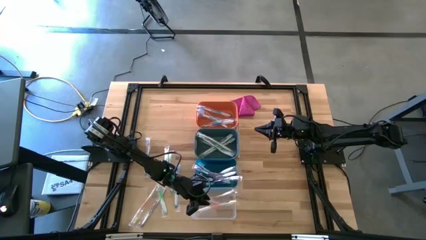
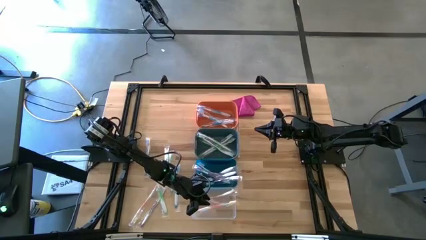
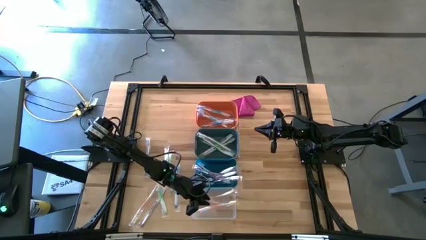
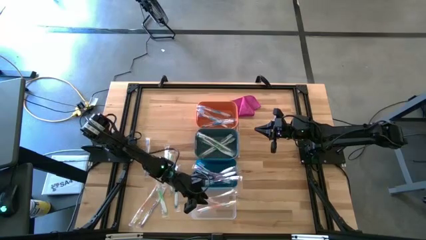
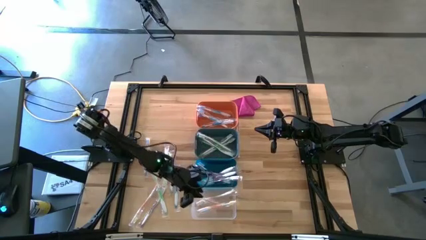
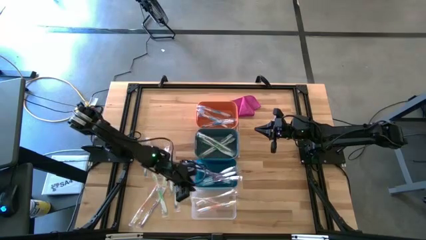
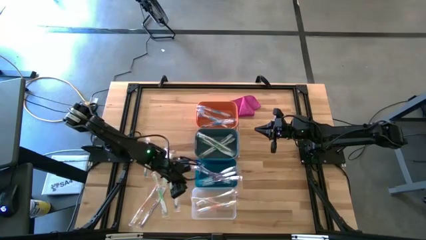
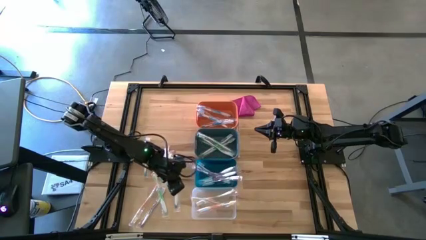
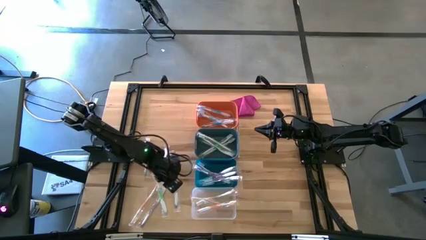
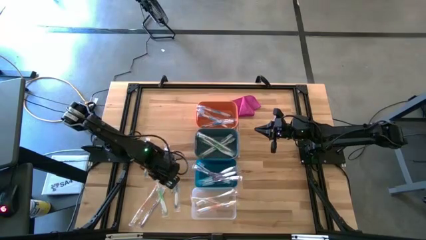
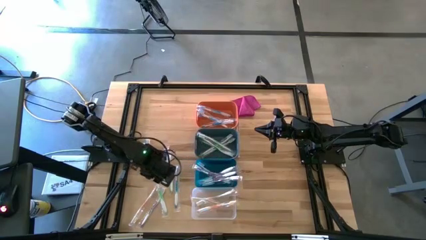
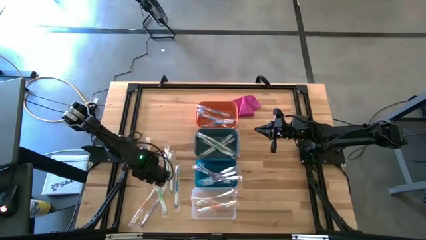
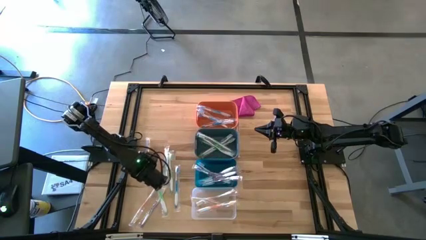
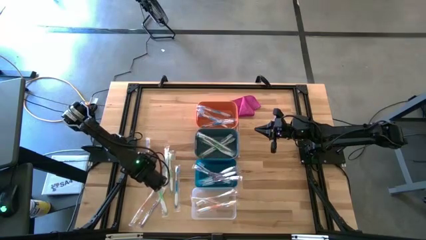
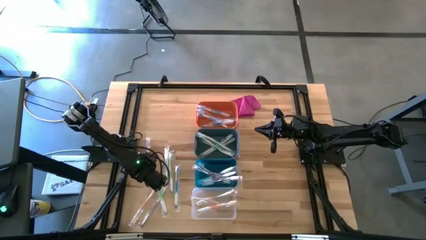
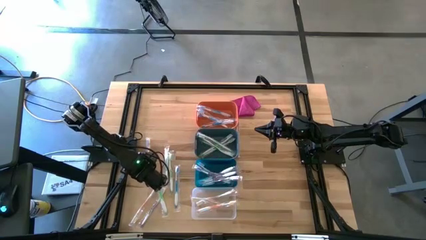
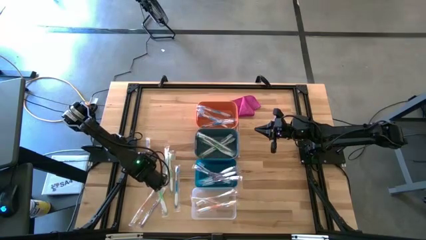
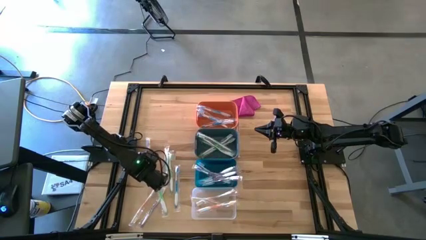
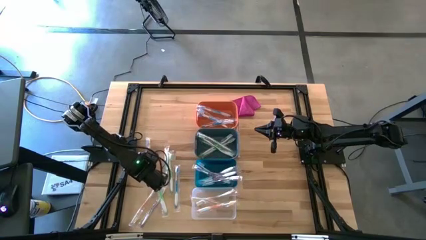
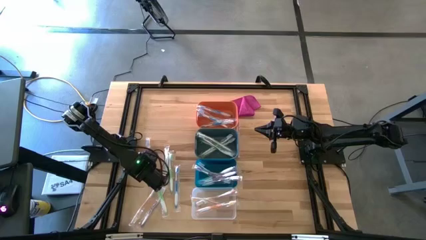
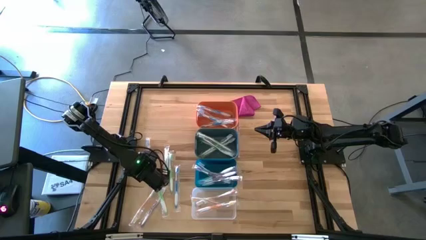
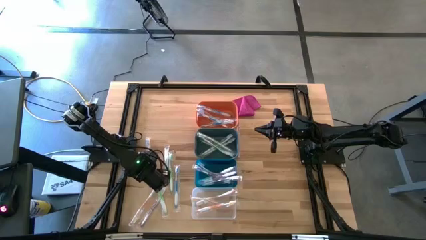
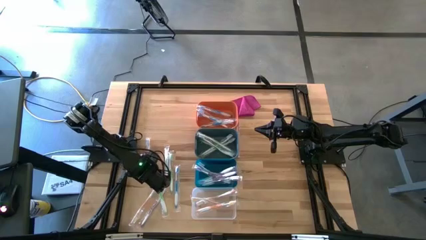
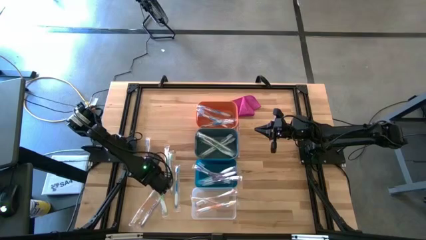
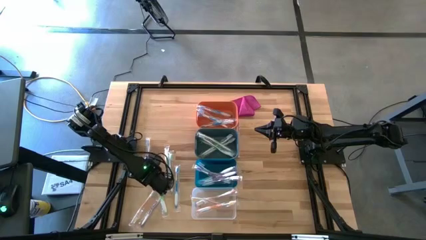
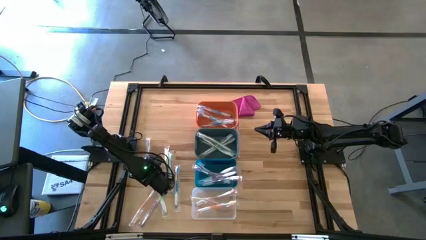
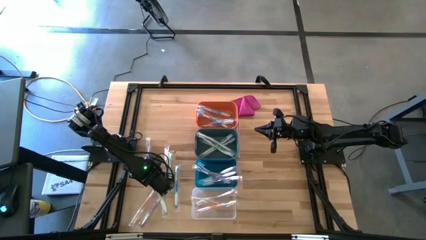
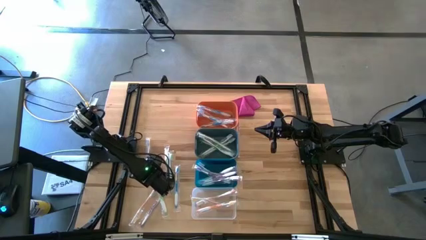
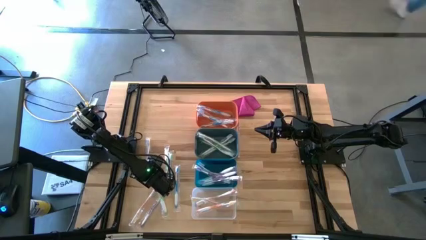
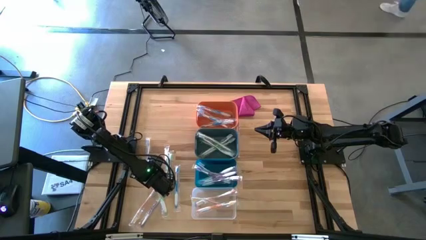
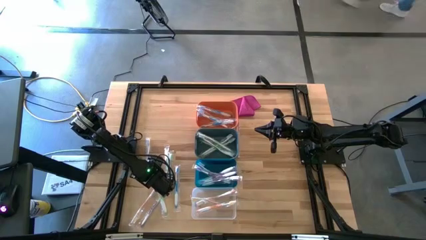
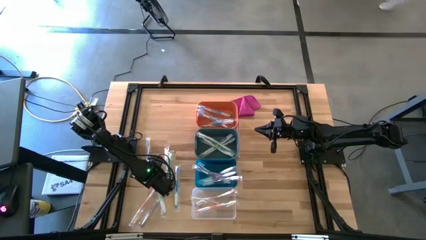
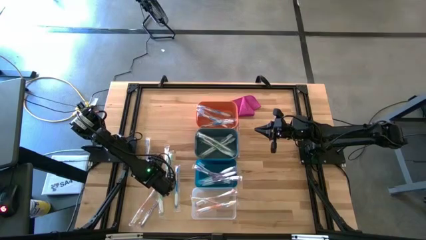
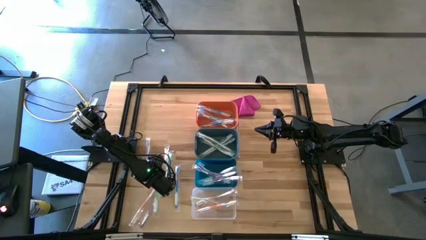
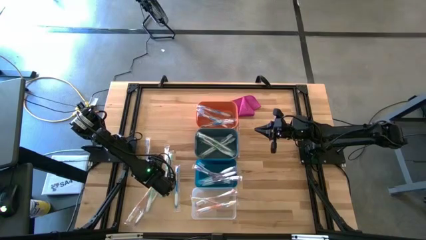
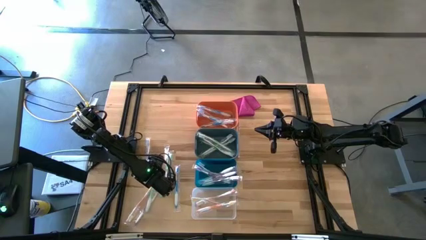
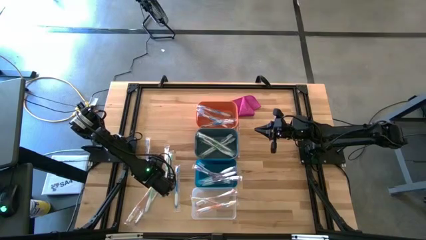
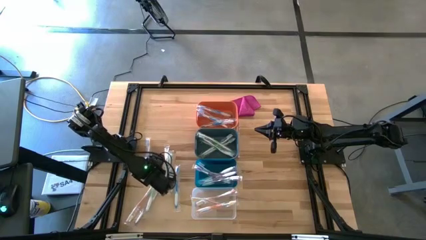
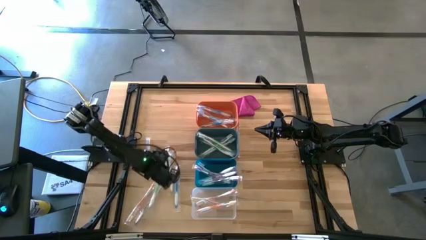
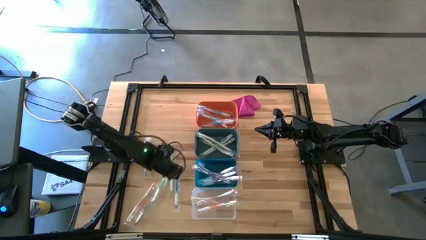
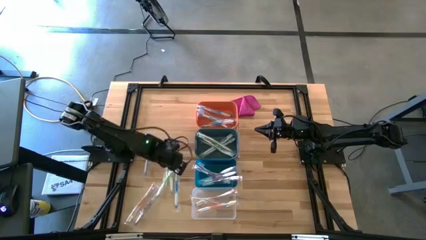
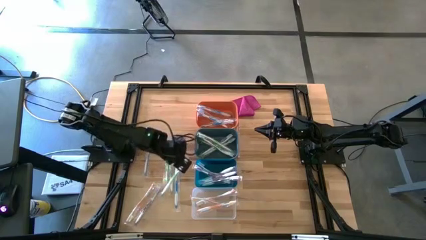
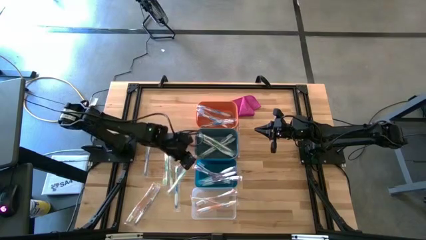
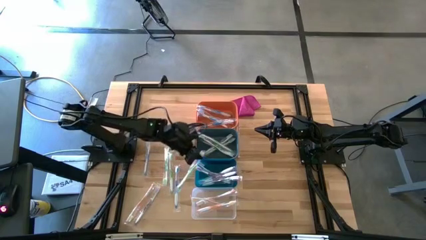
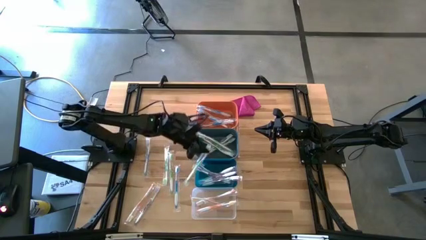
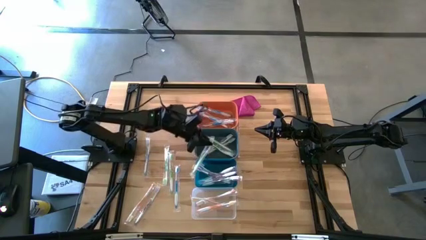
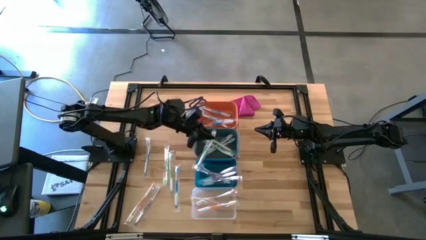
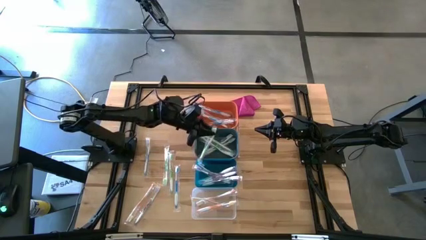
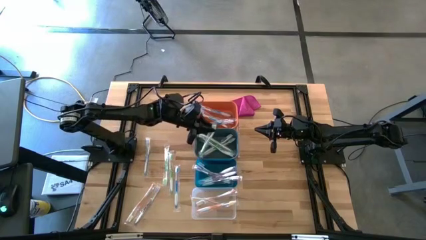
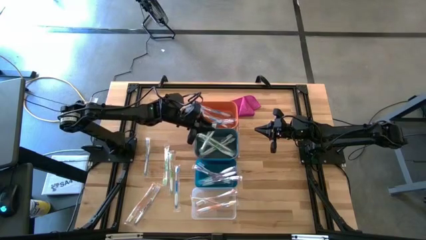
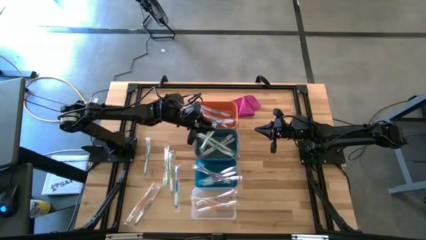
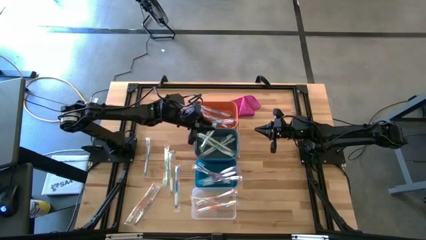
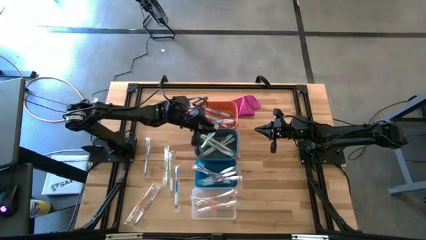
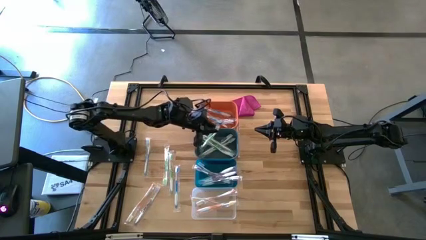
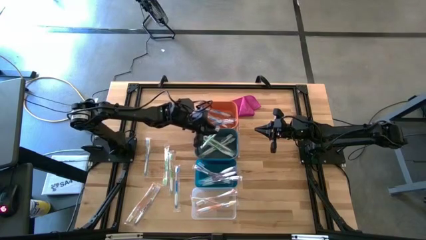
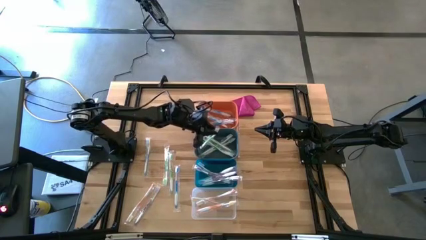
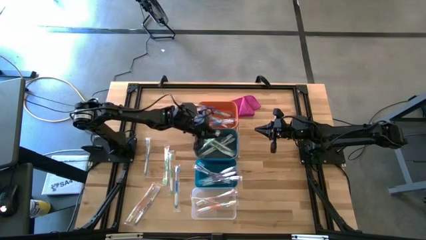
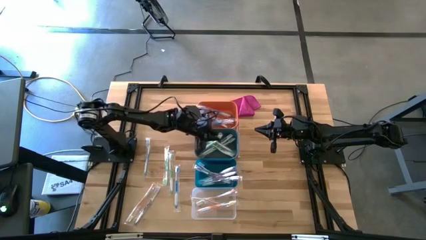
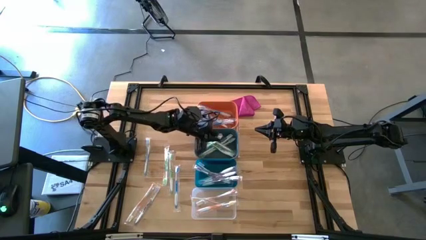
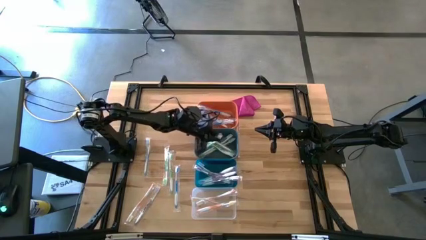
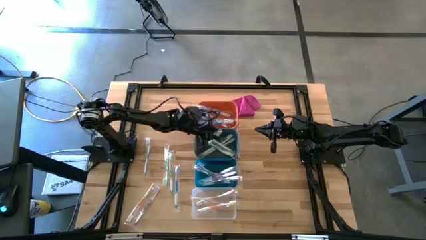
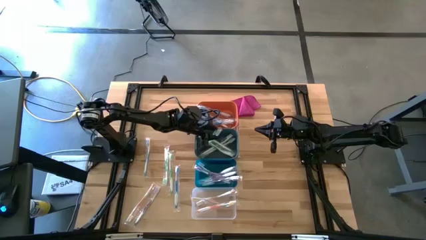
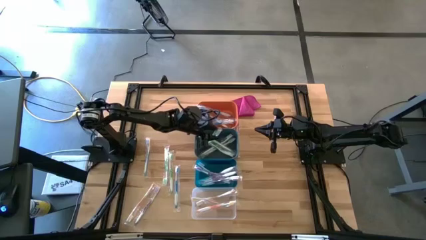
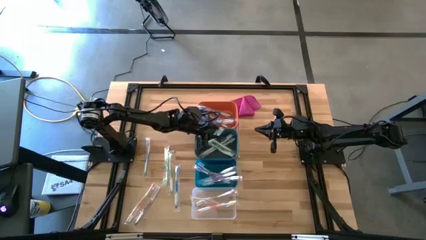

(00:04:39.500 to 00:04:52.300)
Task: Pick & Place Toothbrushes
Put the green toothbrush into the green bin

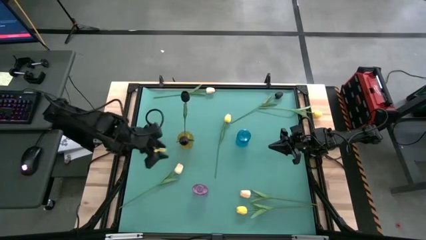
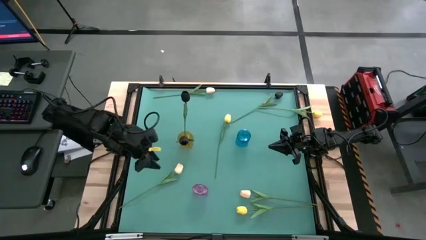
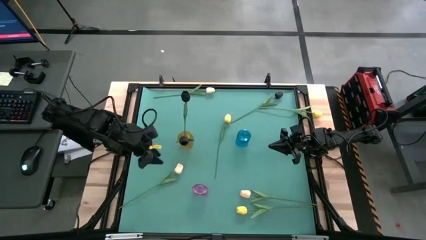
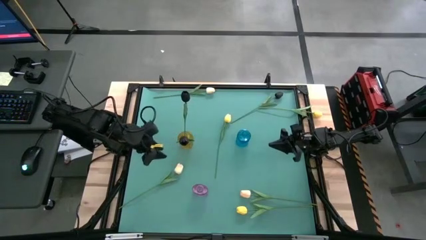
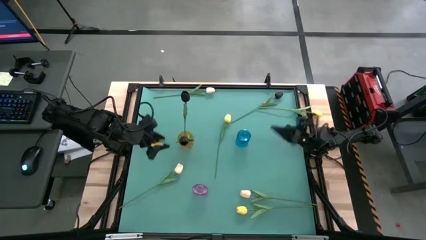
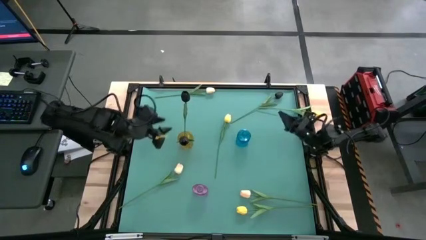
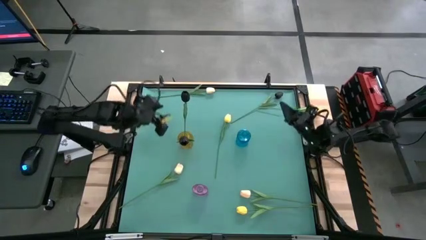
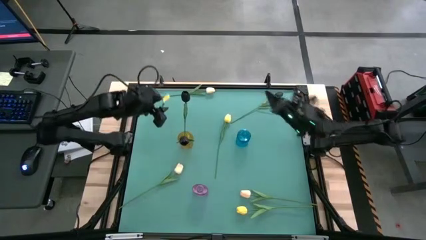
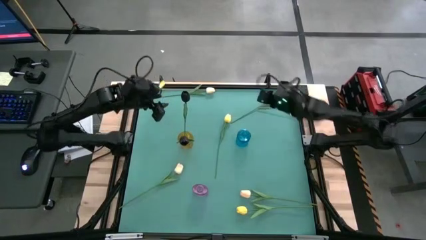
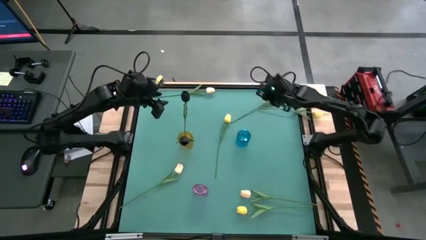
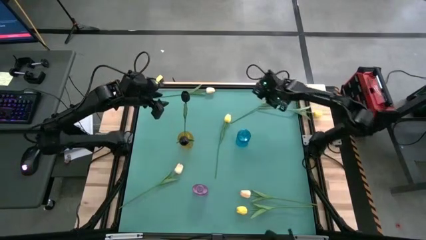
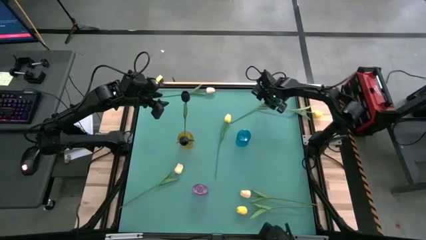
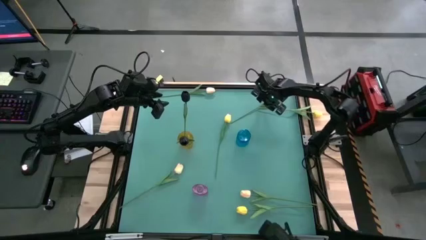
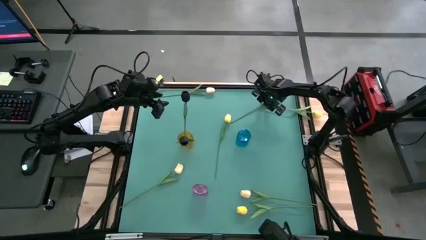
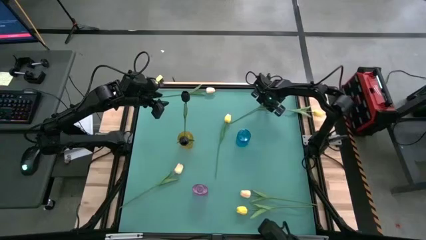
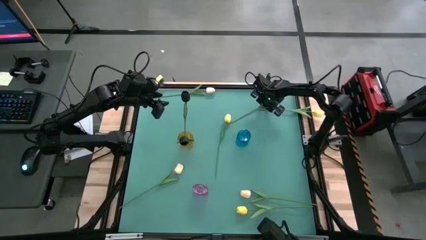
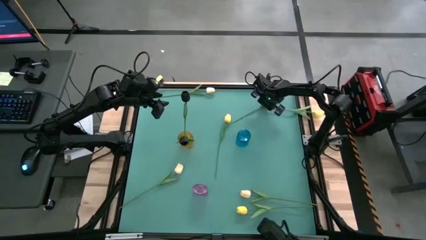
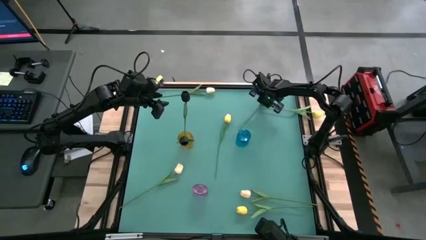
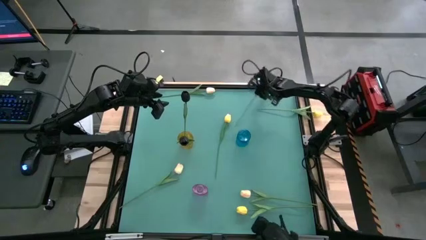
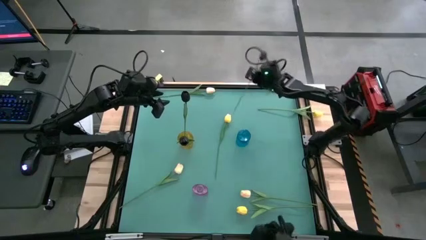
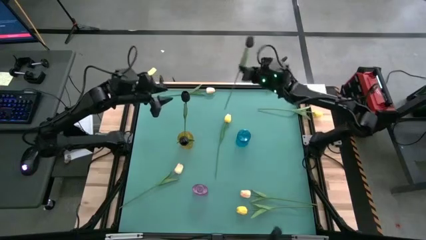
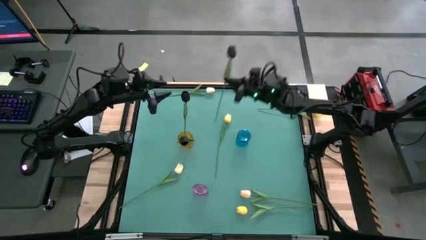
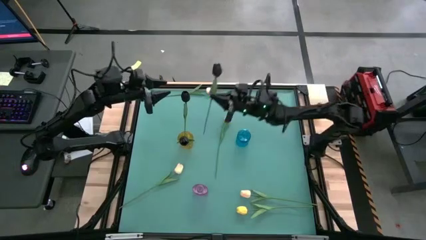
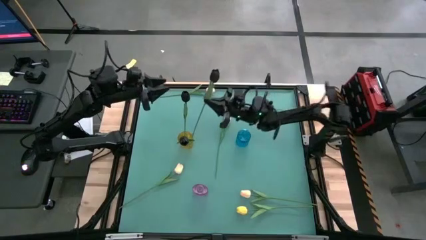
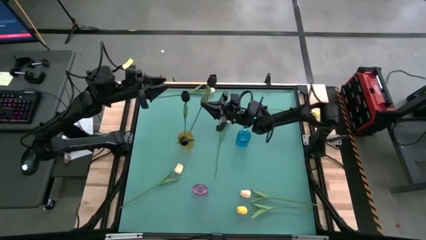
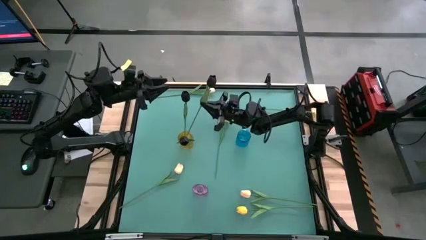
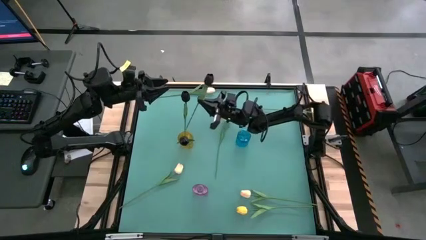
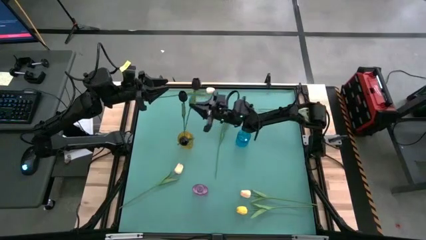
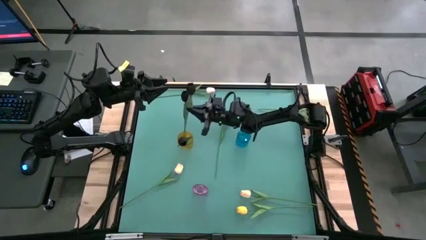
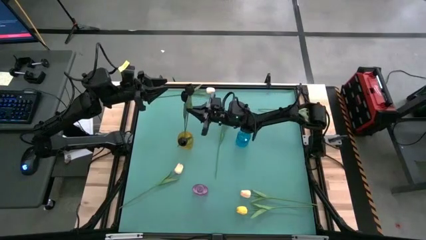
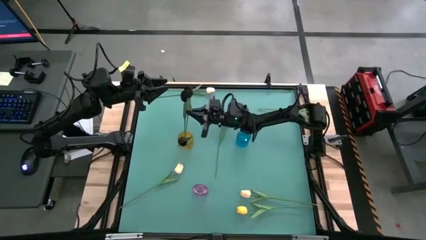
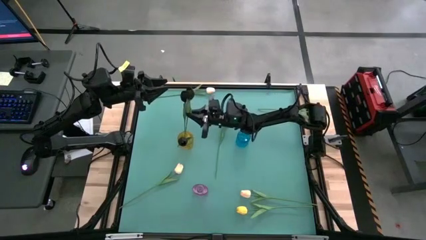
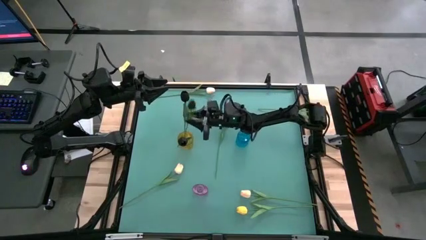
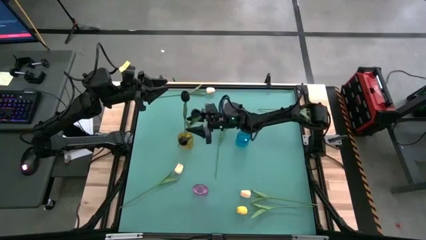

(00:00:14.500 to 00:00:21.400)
Task: Sort flowers into vase by color
Put the black tulip flower into the yellow vase
